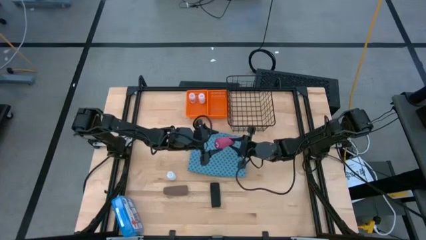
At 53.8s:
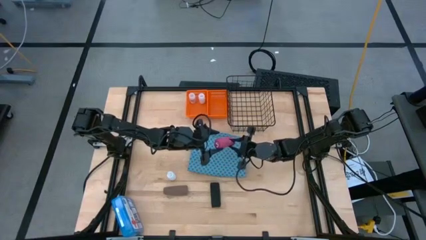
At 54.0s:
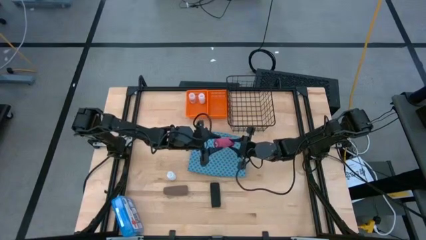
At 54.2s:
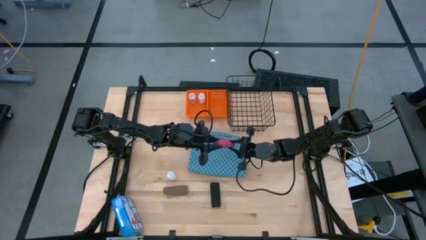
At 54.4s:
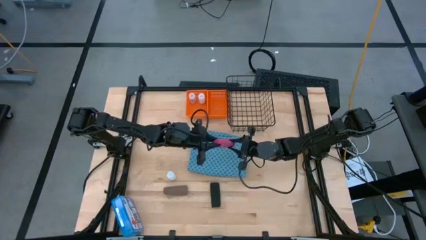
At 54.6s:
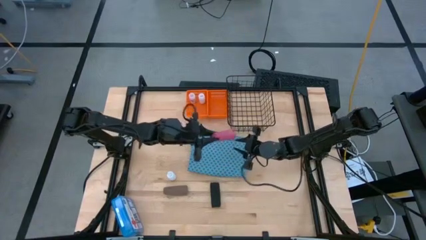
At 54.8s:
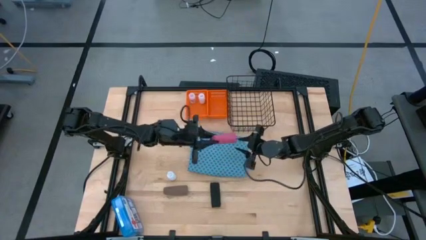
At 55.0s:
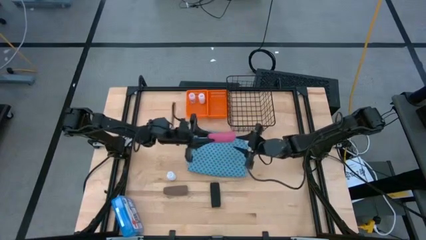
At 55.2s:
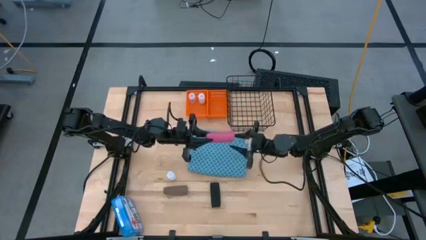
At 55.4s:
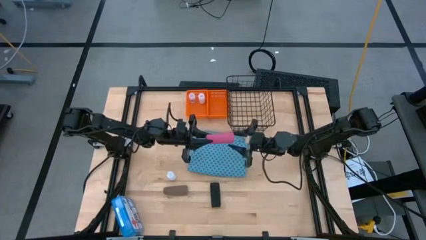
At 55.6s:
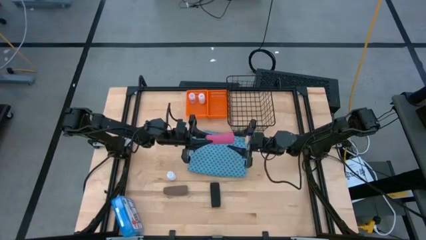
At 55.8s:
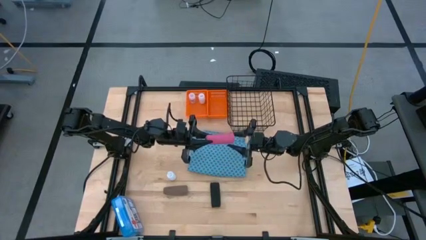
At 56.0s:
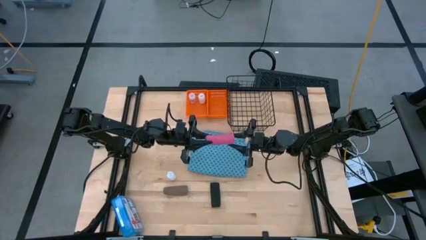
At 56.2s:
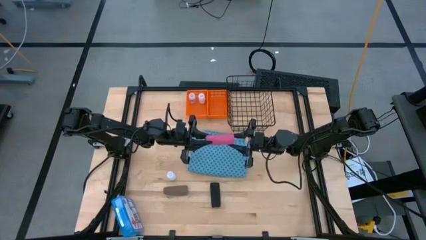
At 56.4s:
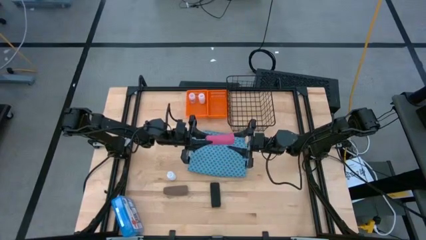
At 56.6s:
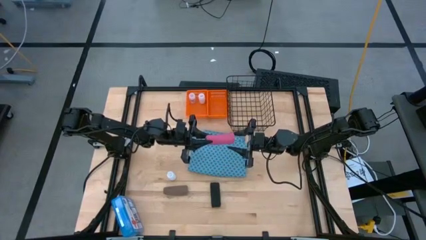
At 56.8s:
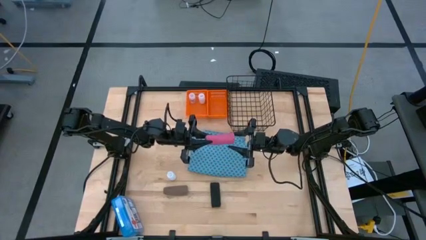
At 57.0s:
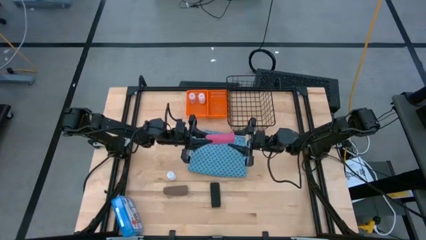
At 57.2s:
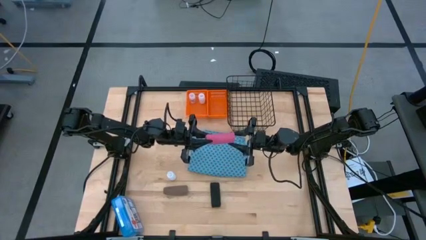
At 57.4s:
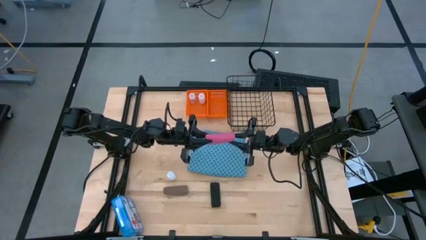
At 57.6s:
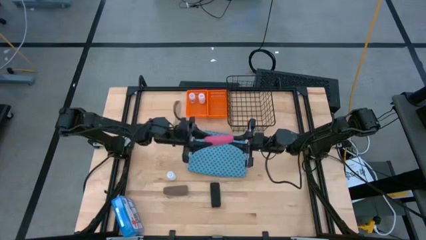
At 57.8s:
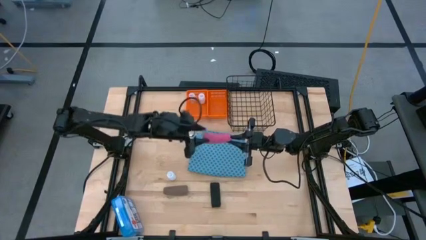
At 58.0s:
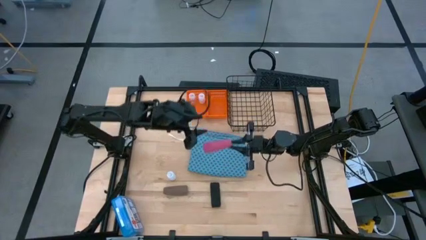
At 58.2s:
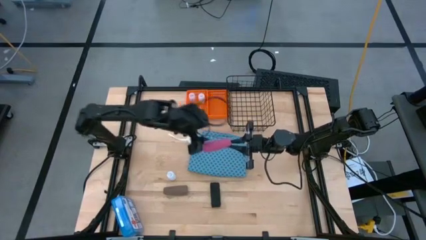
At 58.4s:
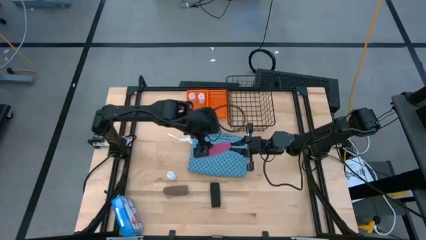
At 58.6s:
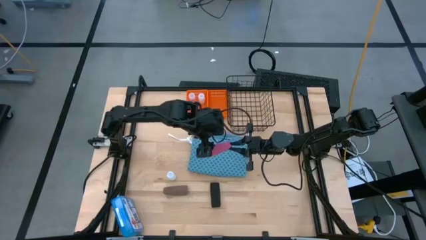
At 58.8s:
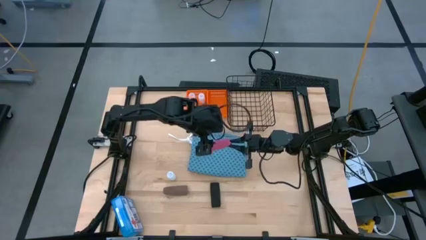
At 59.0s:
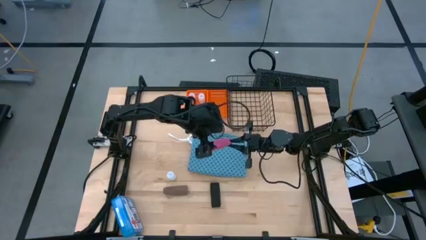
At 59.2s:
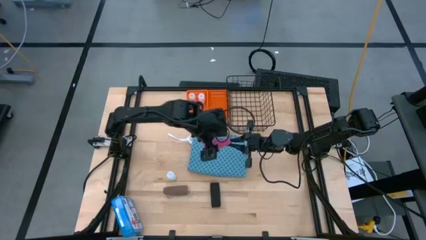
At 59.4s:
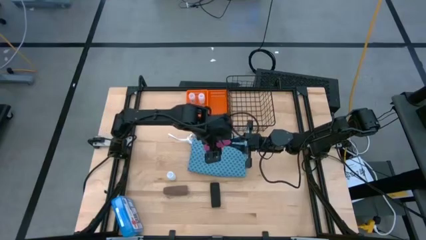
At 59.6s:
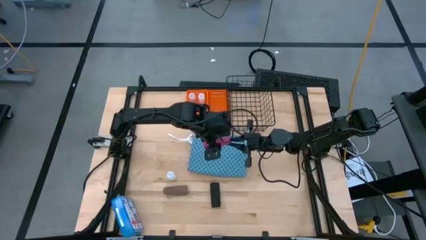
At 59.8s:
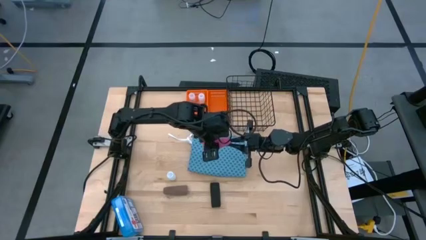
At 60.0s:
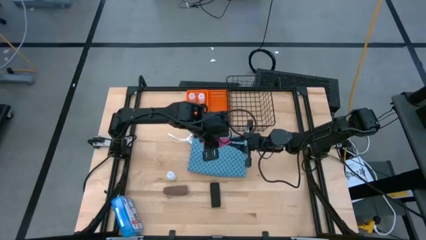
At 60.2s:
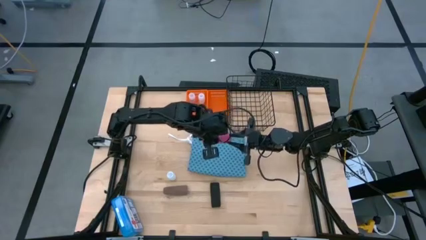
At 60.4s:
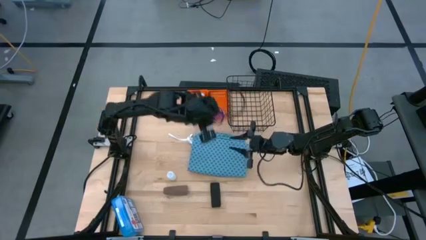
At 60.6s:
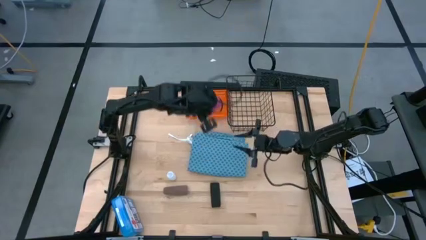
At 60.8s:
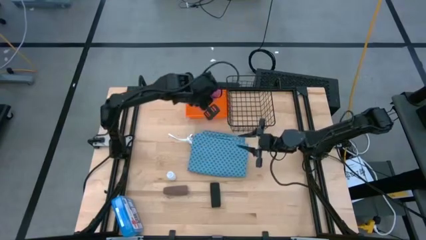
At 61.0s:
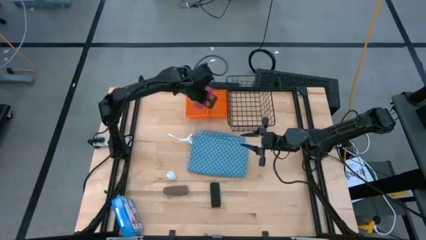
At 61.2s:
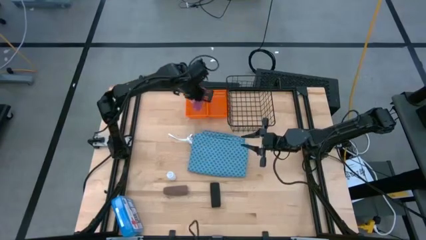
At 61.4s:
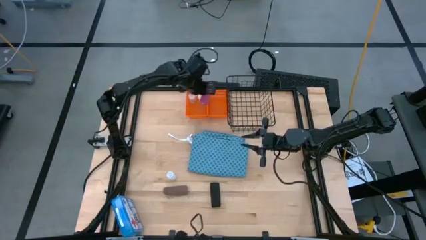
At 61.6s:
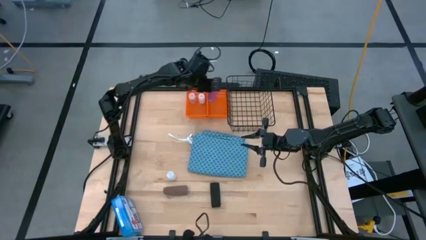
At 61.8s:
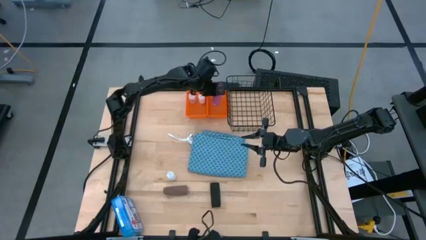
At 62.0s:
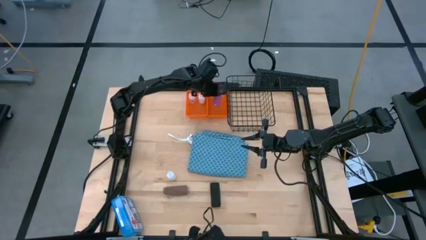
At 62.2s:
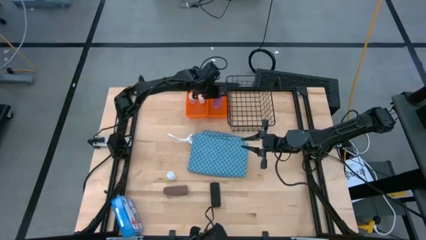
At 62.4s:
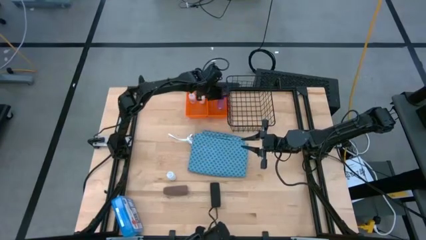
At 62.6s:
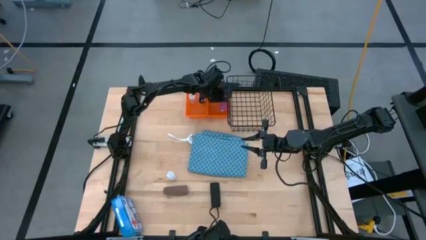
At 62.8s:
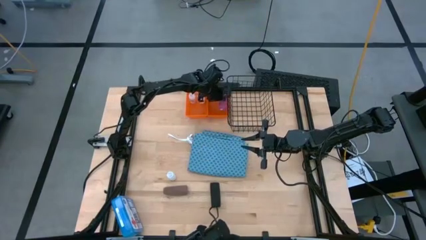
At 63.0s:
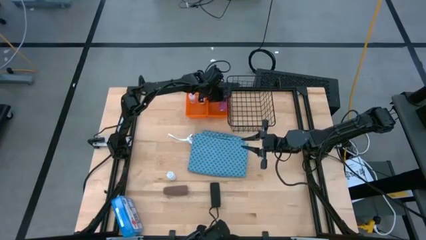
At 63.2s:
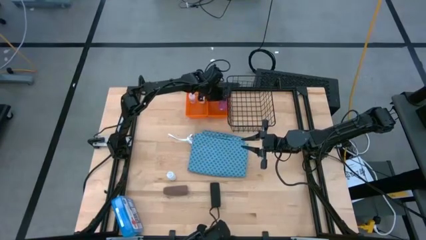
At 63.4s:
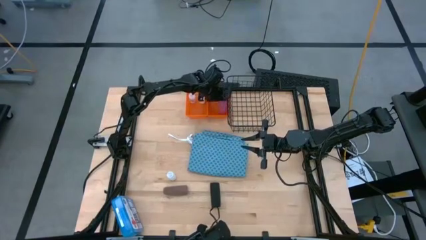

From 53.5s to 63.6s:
Task: Pick & Place Medicine items
Put the pink bandage into the right orange basket

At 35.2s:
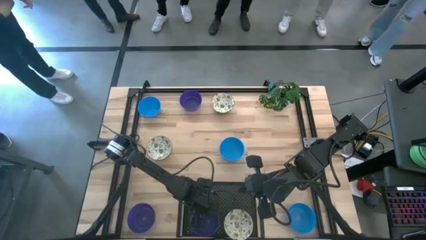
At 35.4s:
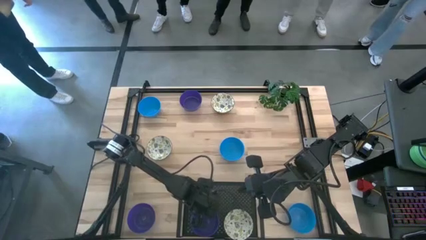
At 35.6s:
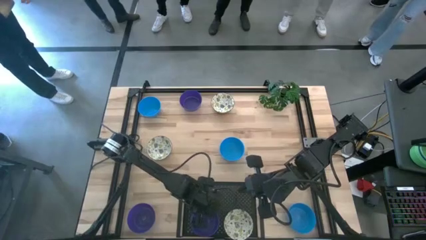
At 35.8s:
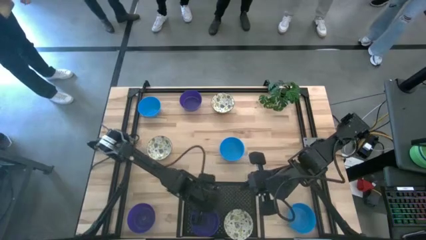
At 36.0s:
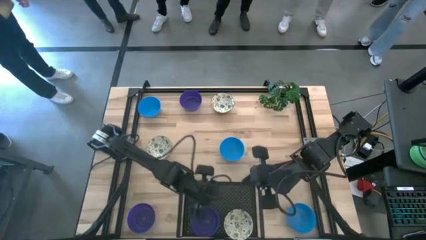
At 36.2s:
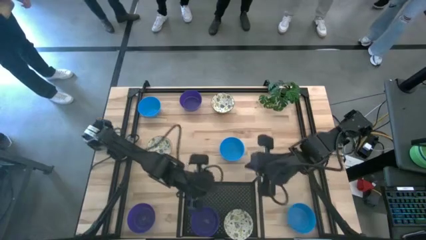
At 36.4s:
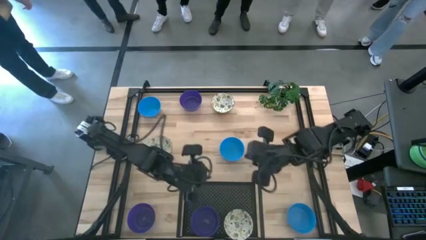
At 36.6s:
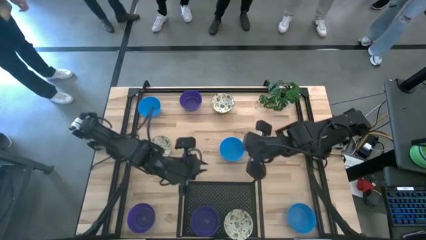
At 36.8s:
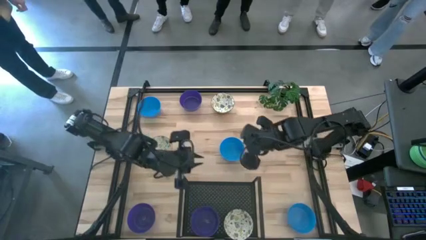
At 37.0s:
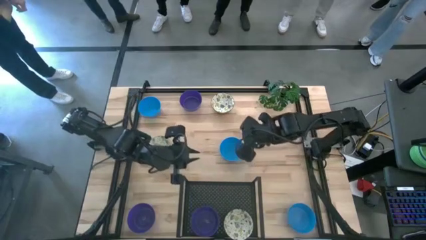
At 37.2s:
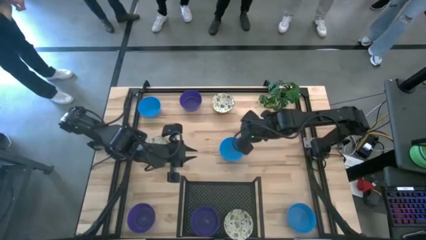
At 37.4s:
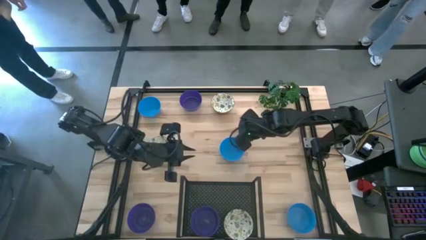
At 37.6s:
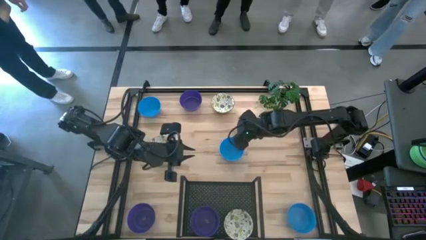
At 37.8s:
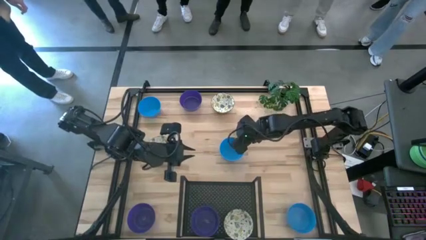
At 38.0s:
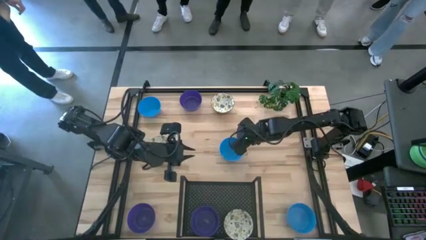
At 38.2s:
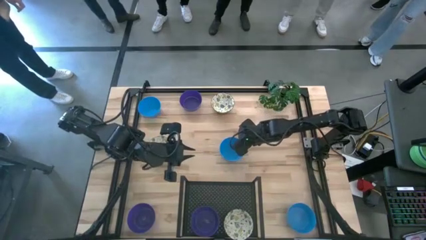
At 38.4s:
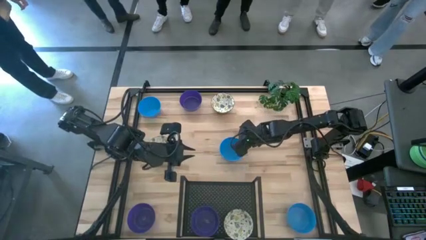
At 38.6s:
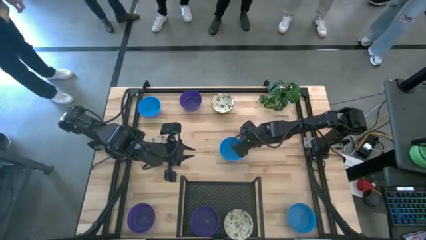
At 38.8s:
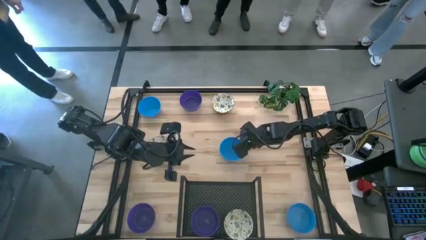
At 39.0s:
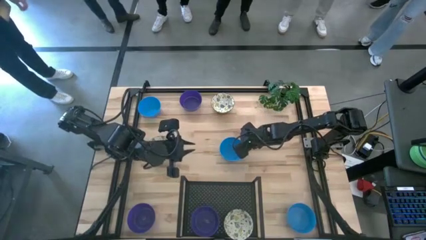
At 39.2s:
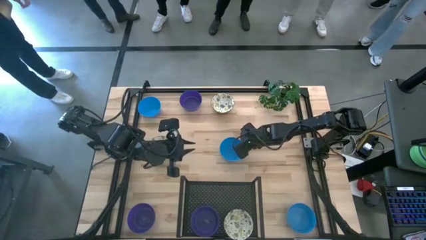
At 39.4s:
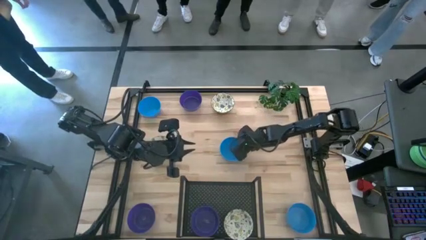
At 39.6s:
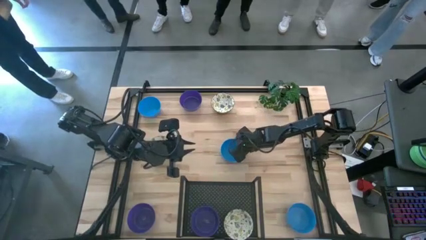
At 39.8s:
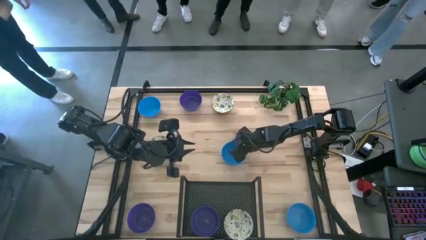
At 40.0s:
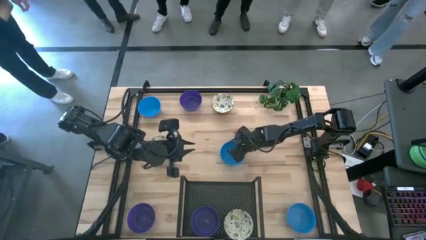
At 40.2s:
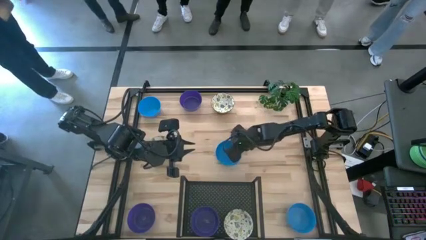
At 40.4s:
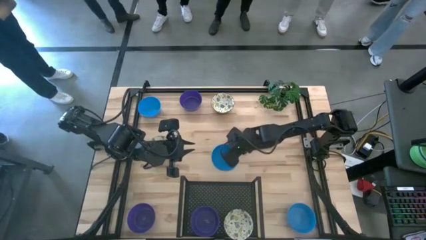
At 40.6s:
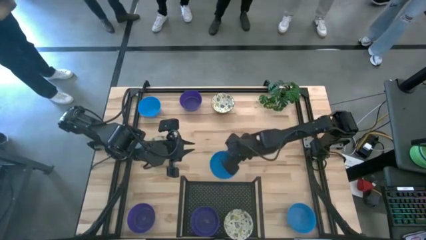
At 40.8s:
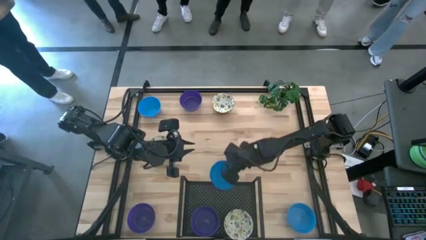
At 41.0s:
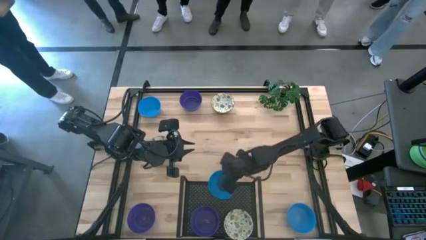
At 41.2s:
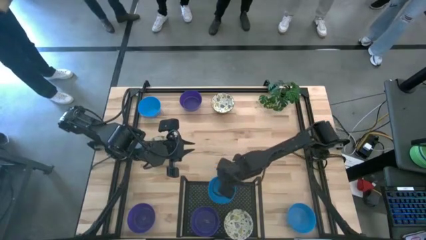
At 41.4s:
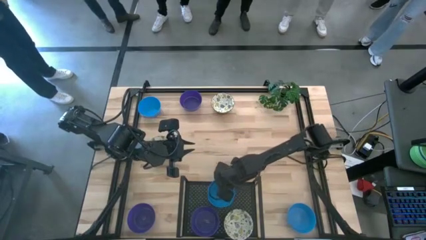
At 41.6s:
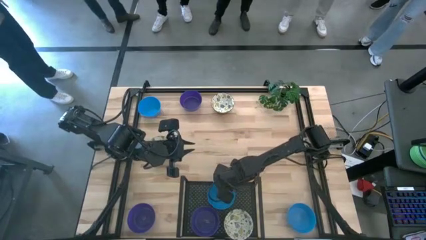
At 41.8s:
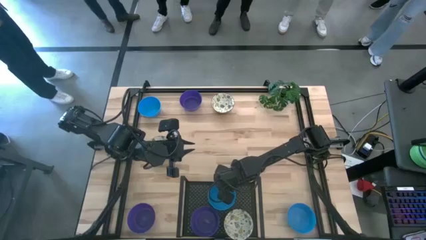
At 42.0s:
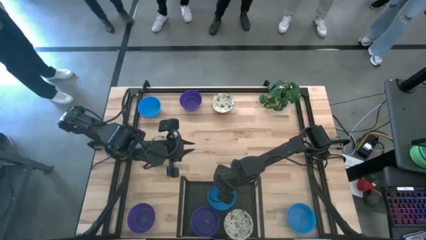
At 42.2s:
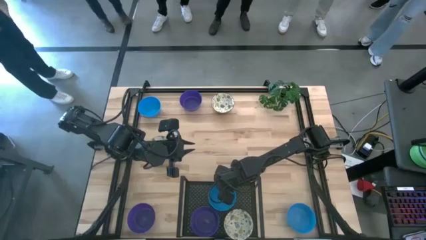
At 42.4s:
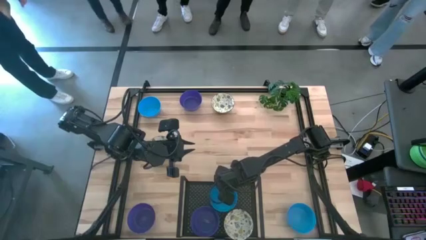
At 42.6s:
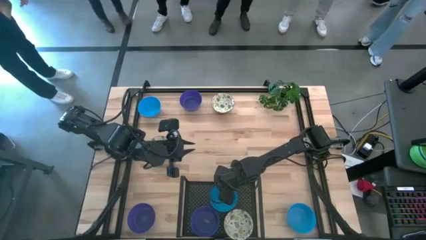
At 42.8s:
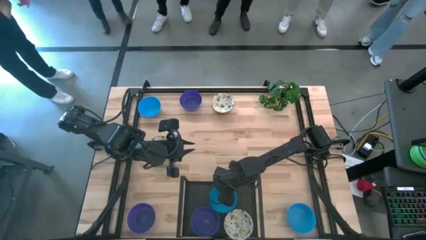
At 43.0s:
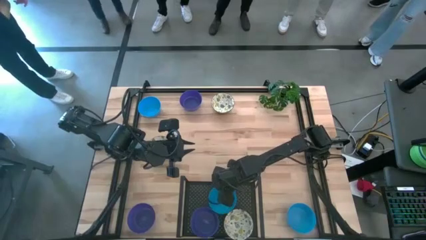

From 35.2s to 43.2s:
Task: Pick & Place Mini bowls
Put the middle blue bowl on the shelf
